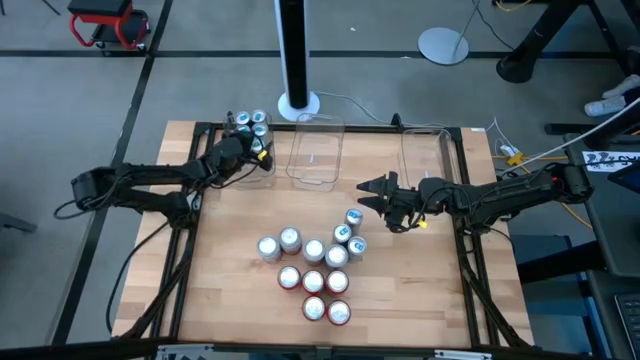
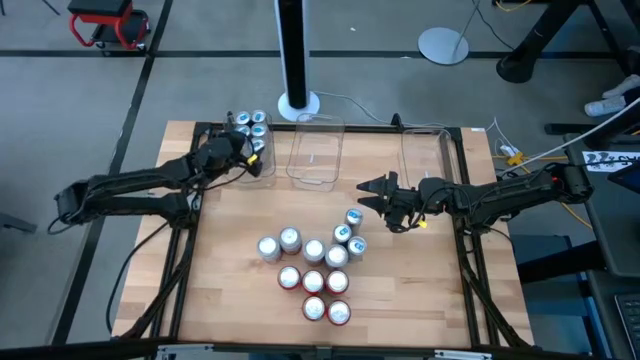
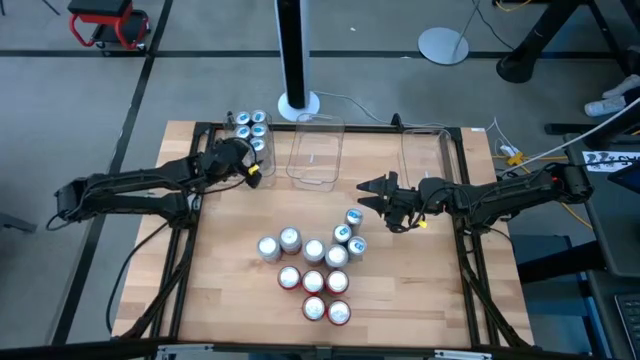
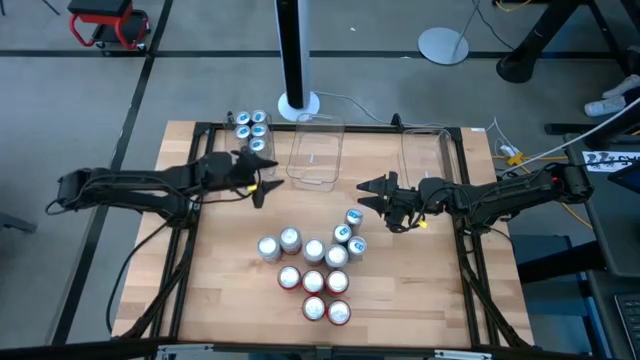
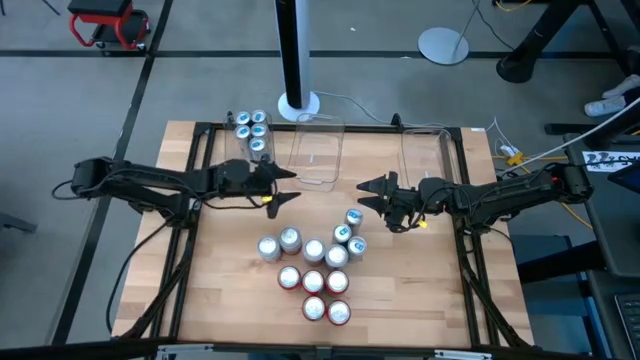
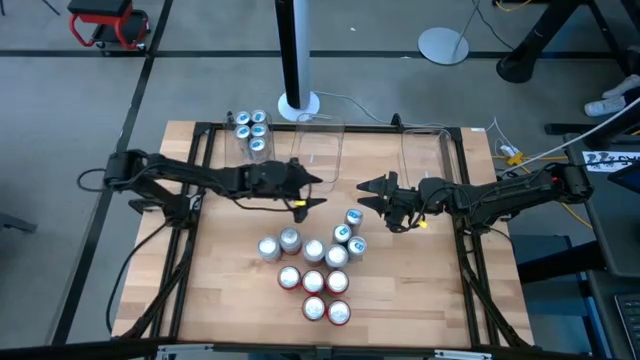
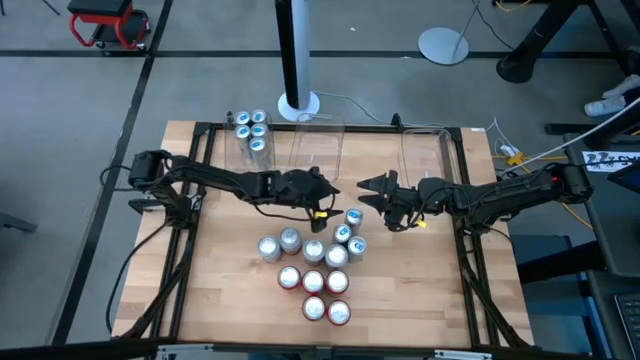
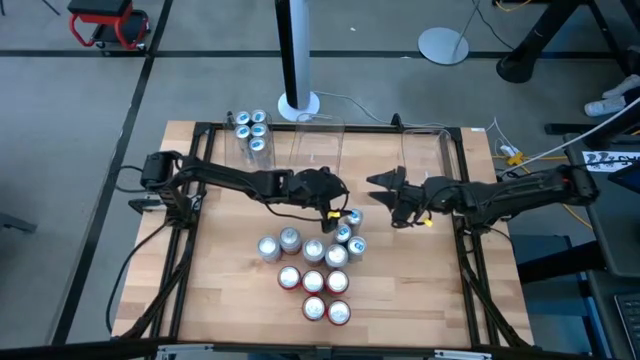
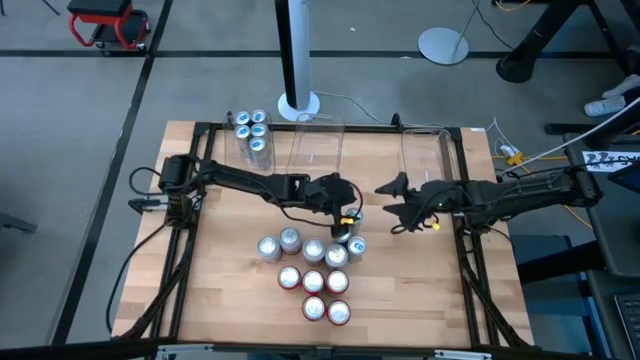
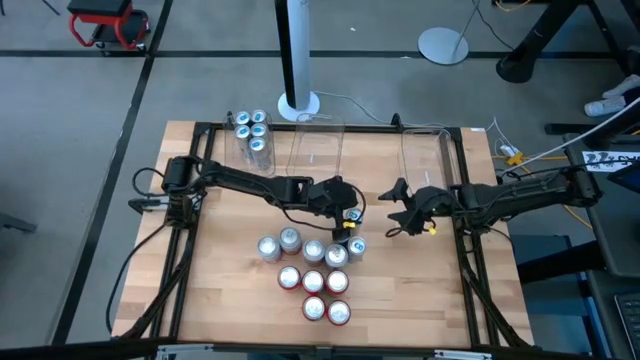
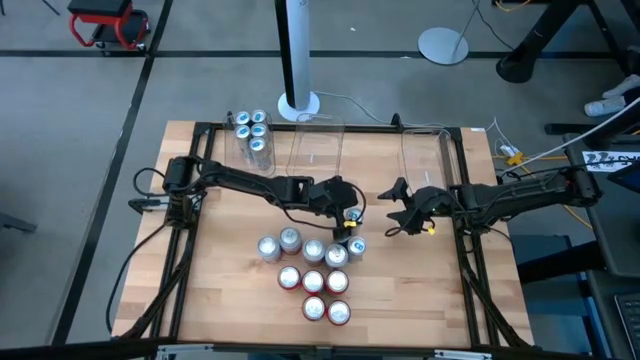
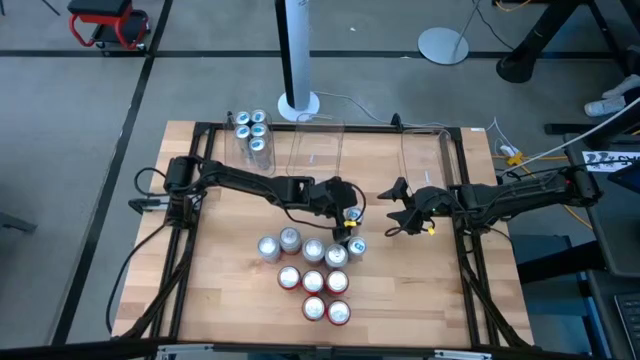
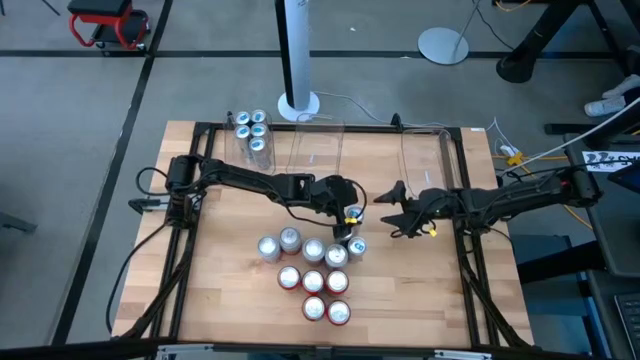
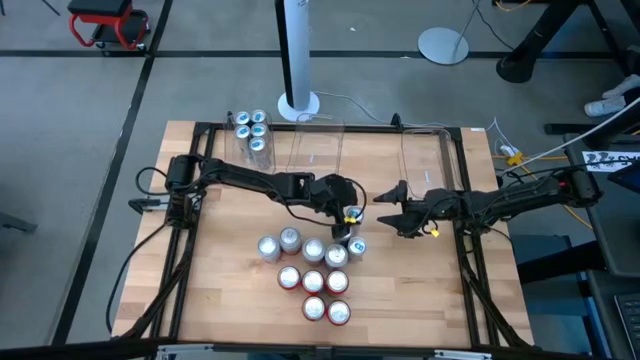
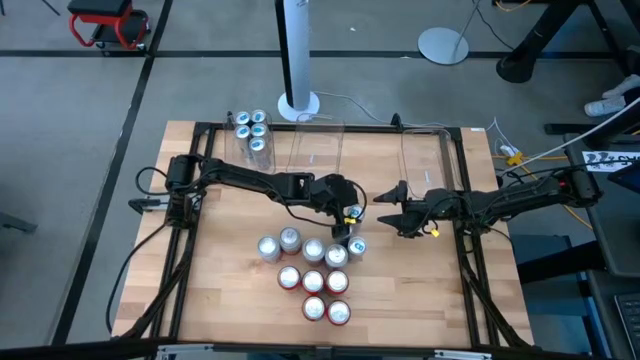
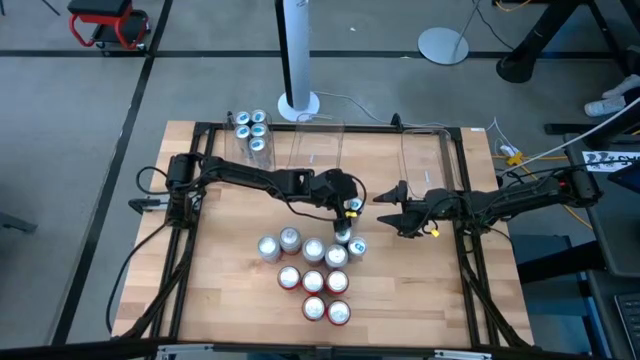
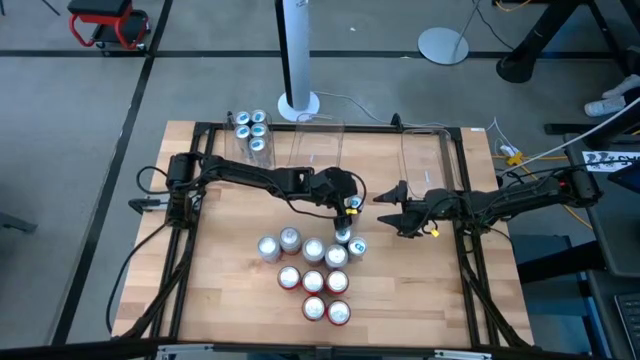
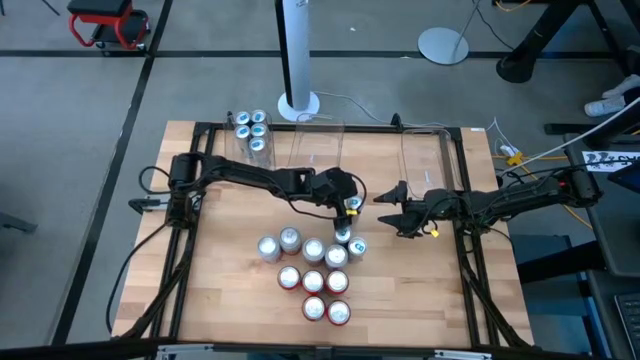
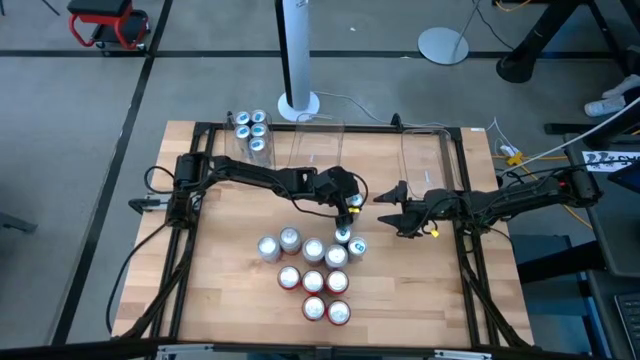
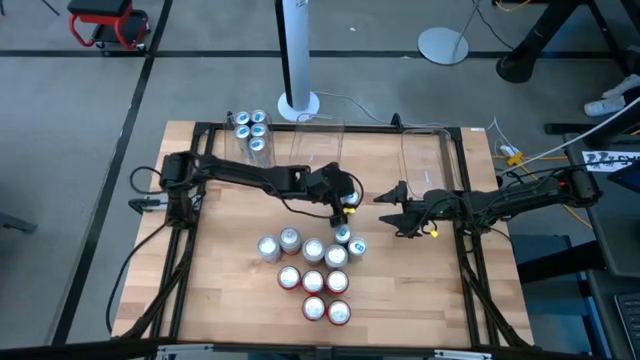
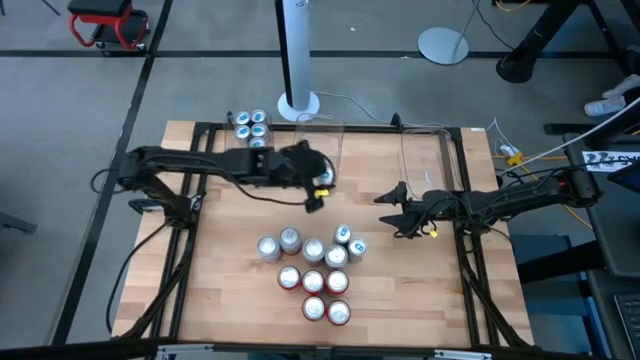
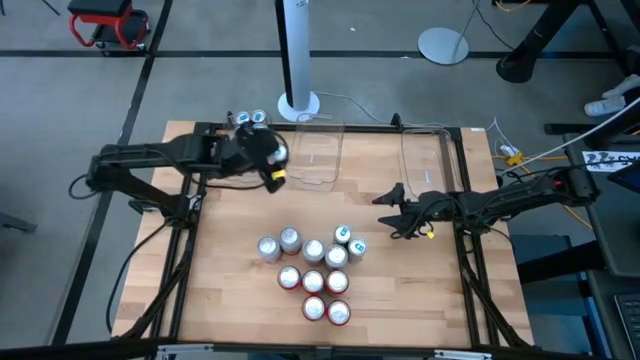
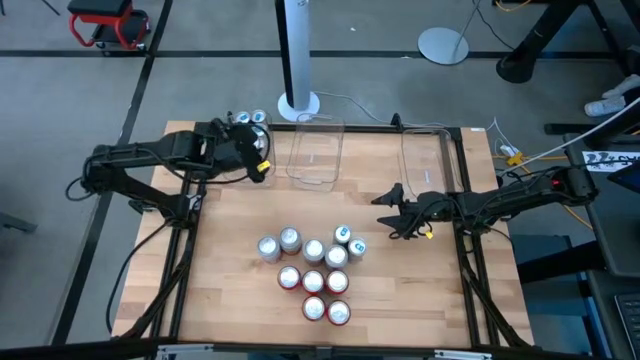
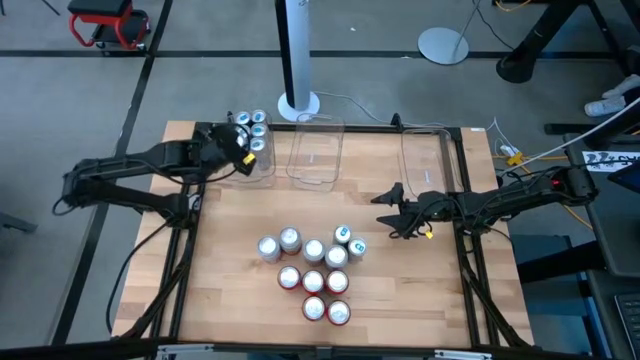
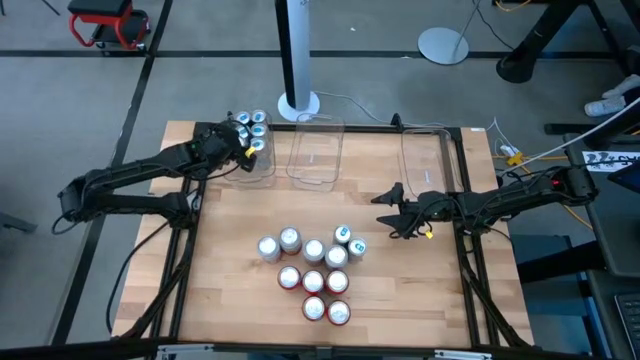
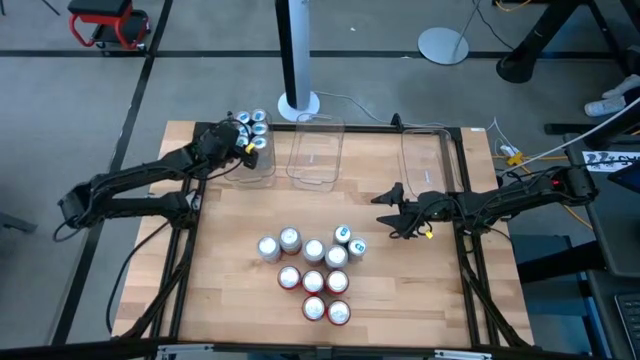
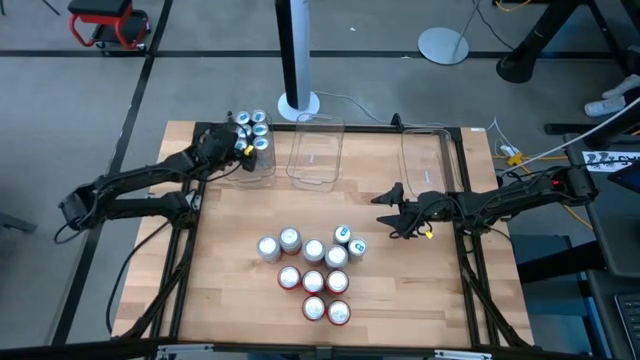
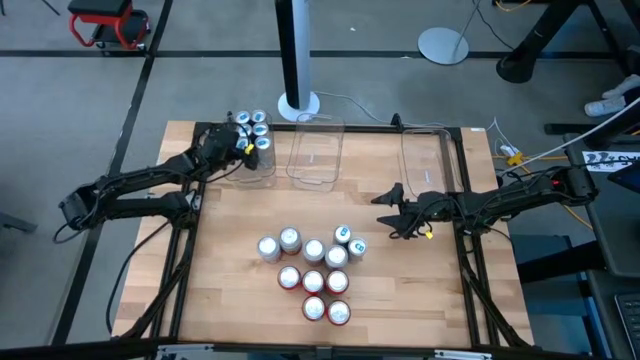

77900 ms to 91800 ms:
Task: Sort soda cans
Put the blue soda can into the left transparent bin

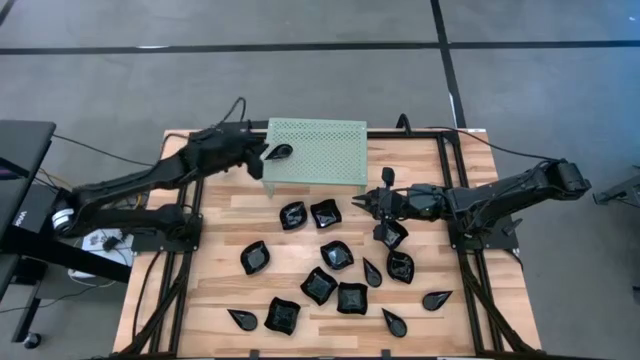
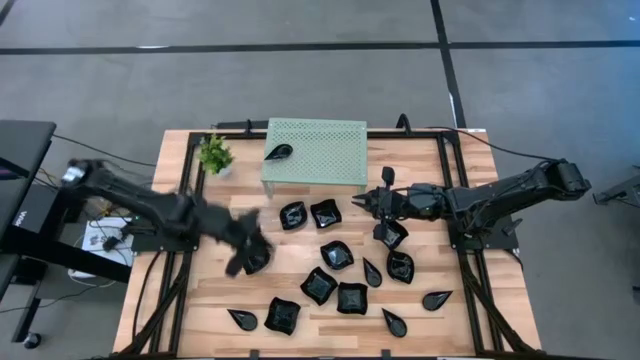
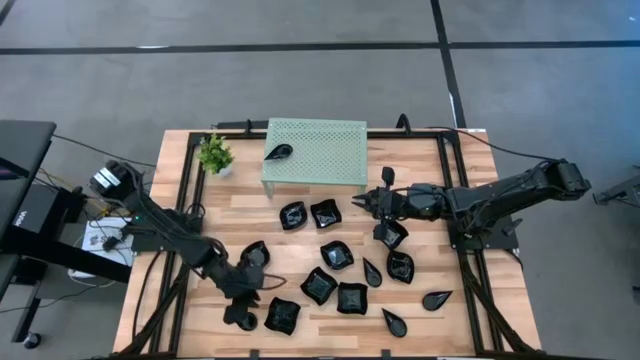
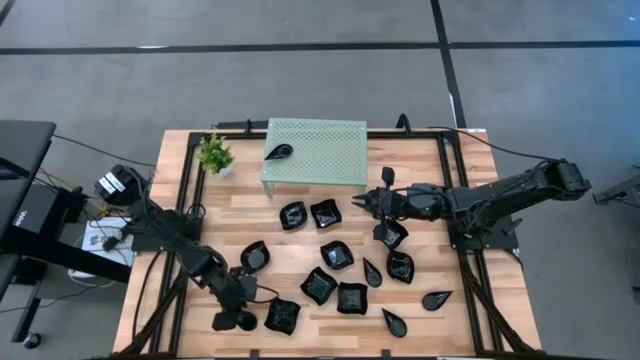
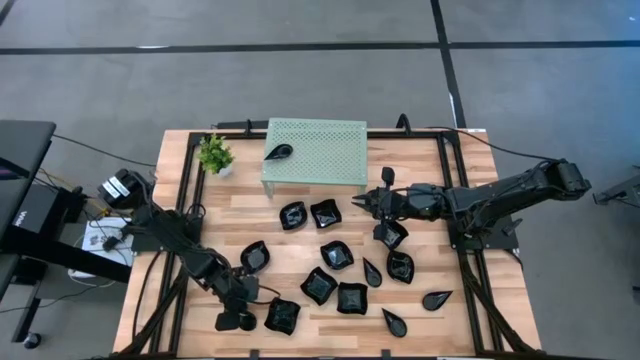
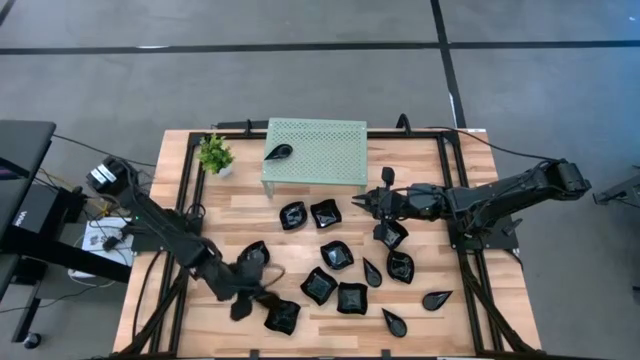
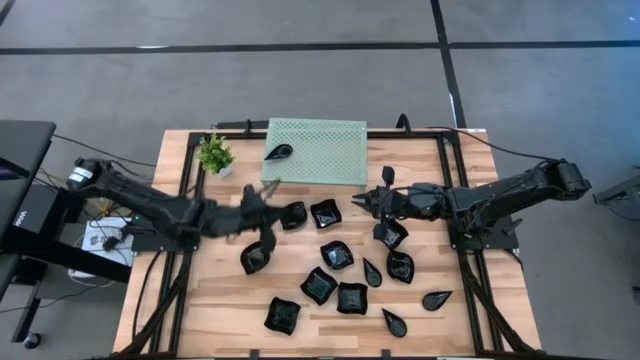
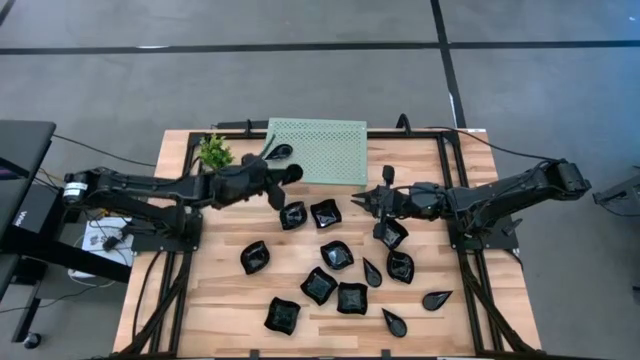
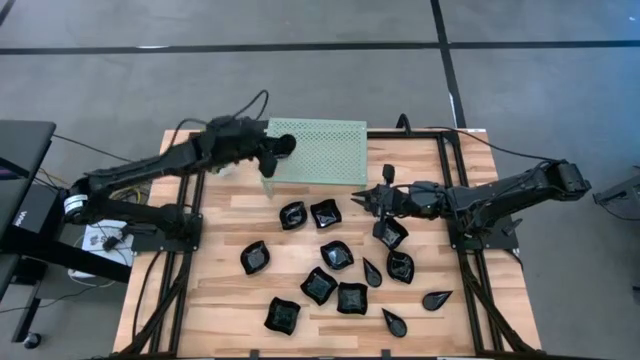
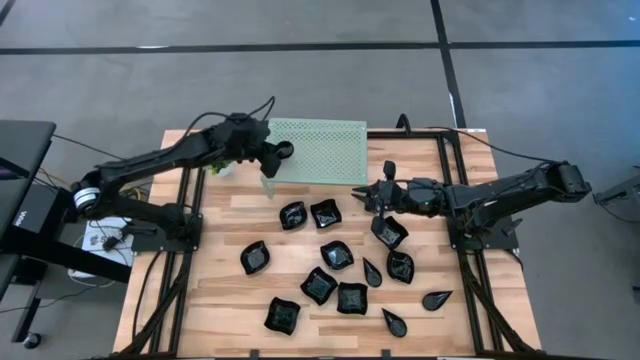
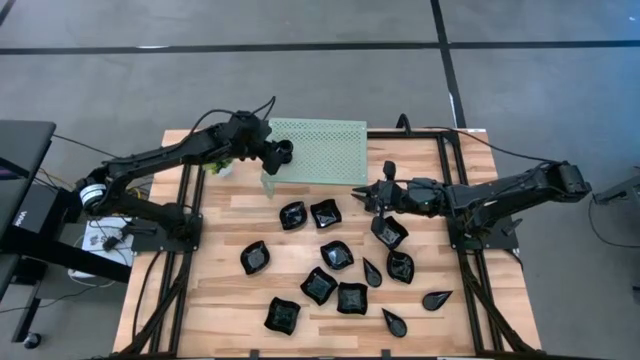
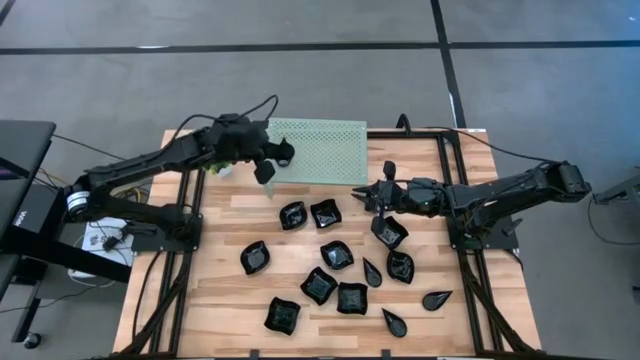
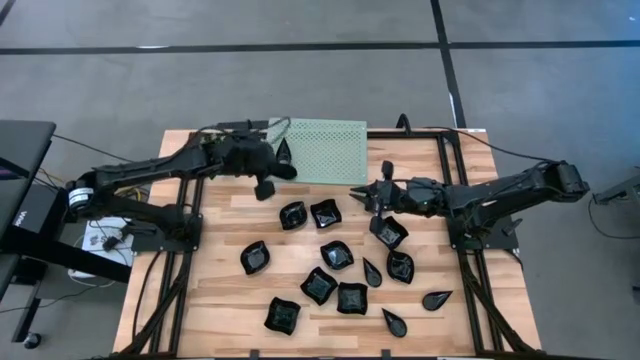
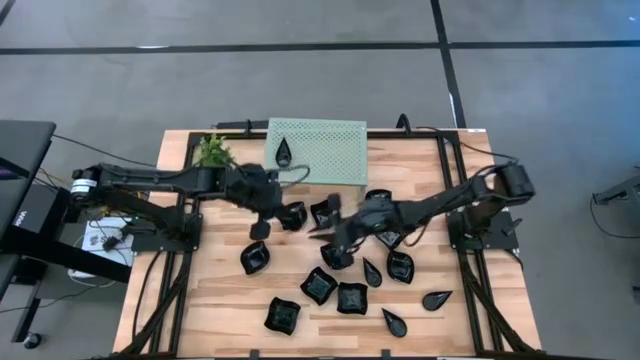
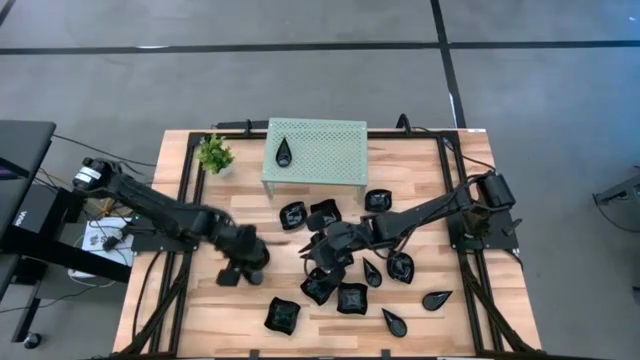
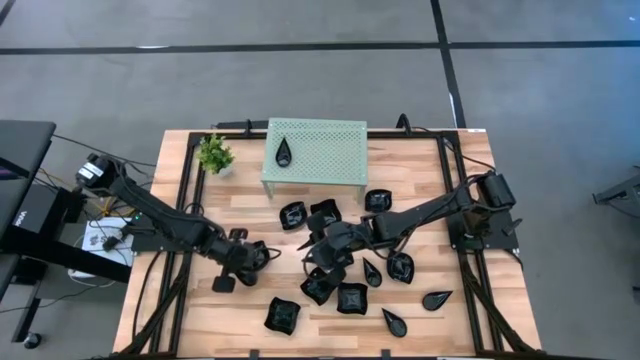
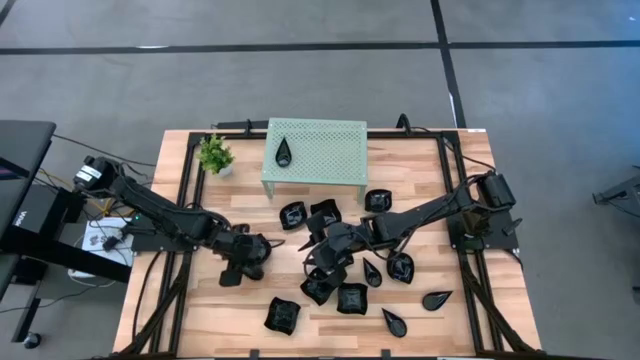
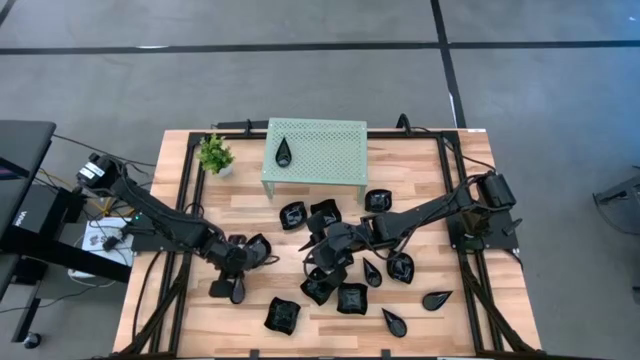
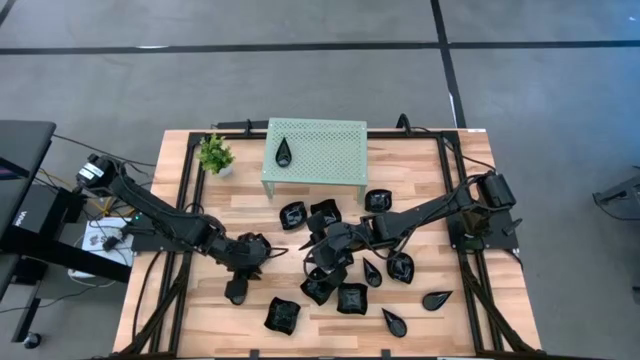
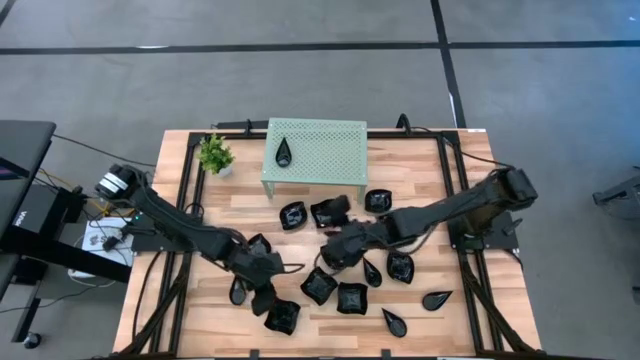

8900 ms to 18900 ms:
Task: Pick & Place Mini shaped plates
Stack the drop shaped plate on top of the other drop shaped plate on the shelf
